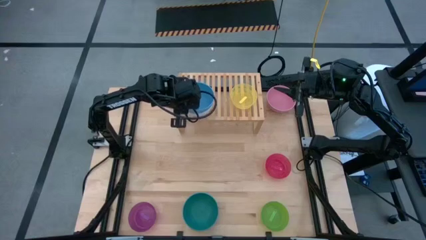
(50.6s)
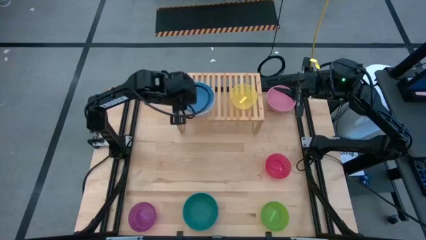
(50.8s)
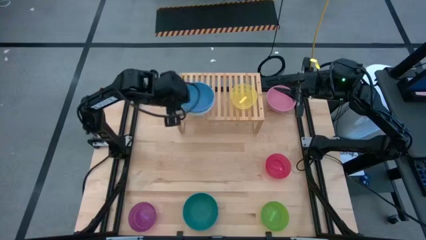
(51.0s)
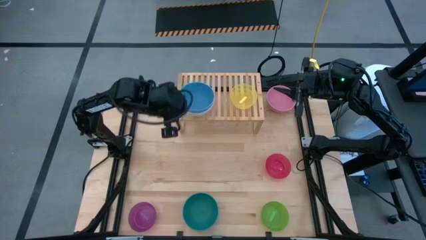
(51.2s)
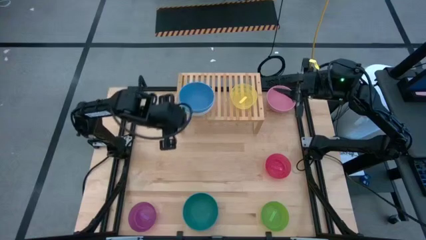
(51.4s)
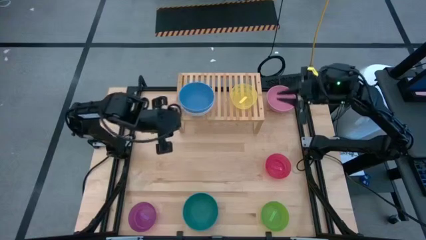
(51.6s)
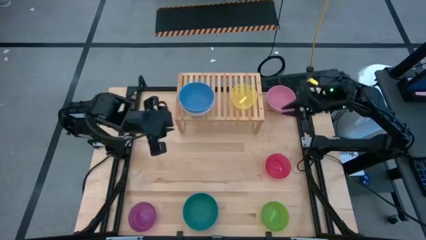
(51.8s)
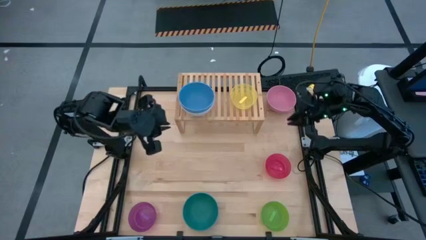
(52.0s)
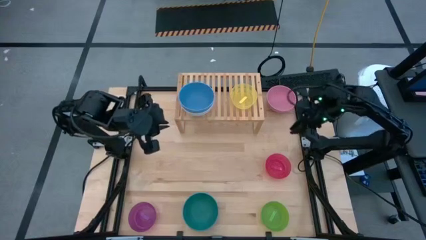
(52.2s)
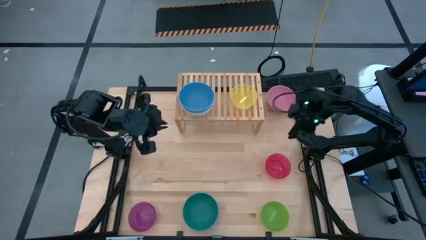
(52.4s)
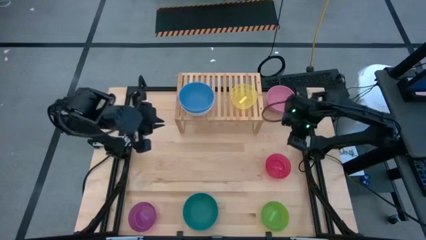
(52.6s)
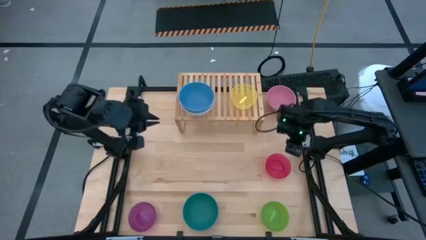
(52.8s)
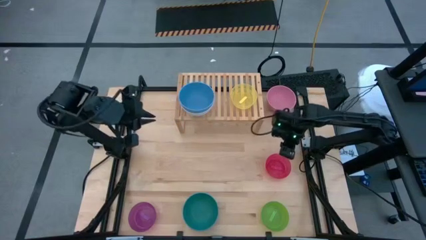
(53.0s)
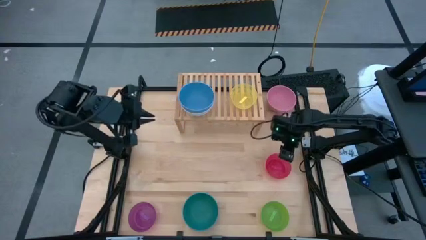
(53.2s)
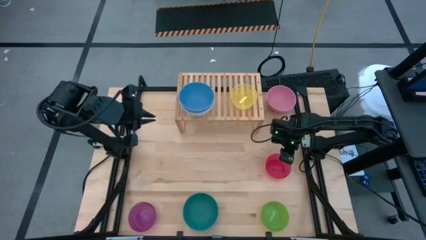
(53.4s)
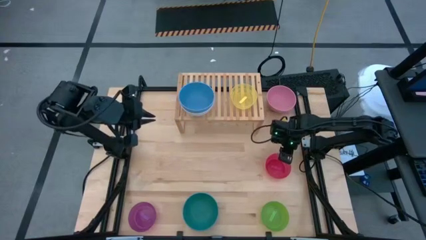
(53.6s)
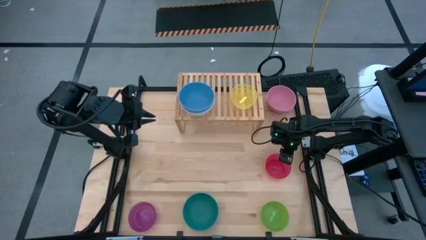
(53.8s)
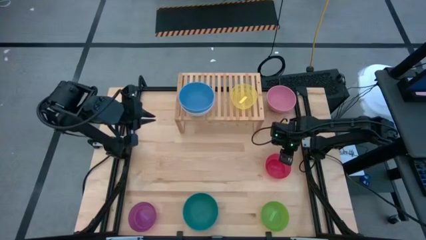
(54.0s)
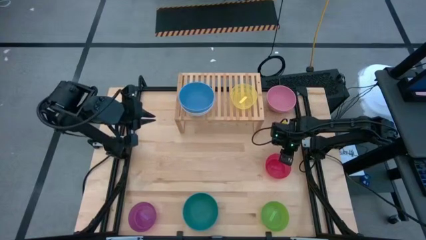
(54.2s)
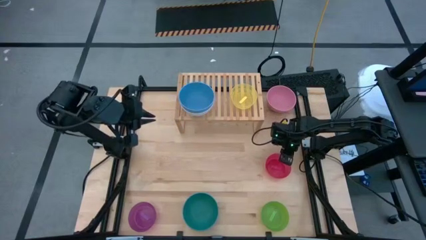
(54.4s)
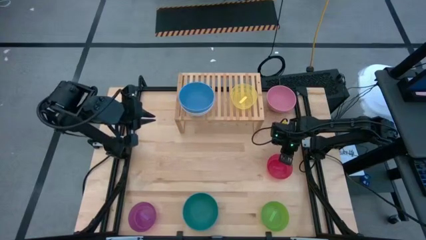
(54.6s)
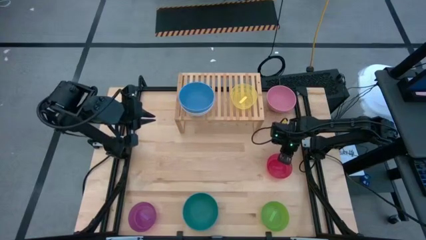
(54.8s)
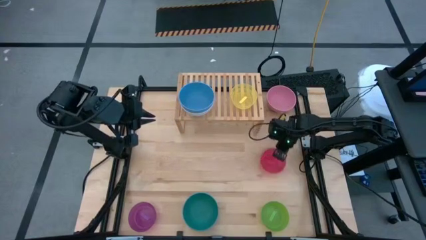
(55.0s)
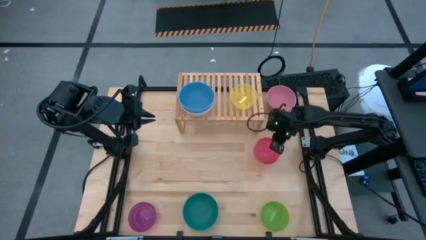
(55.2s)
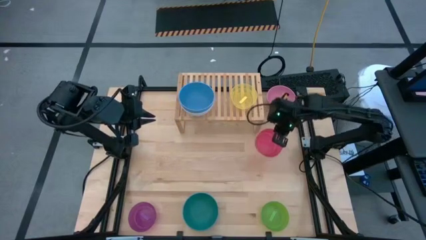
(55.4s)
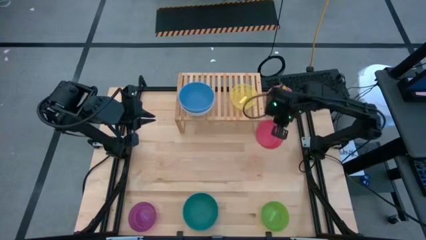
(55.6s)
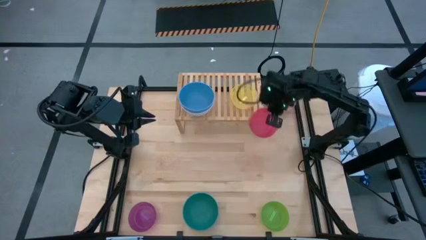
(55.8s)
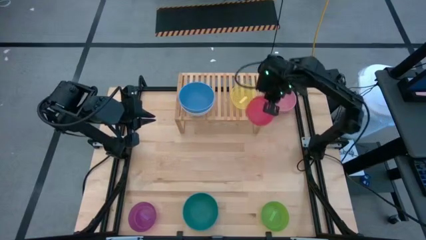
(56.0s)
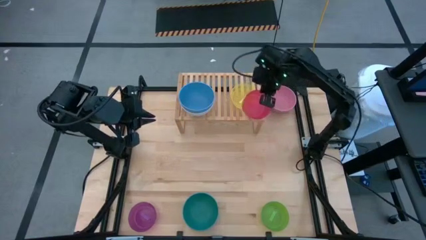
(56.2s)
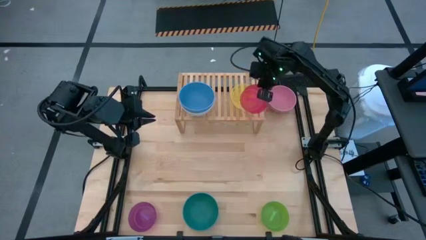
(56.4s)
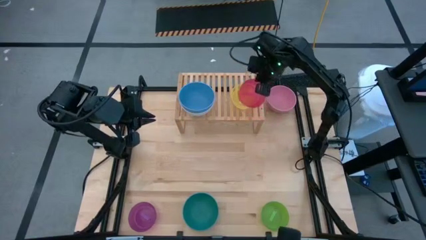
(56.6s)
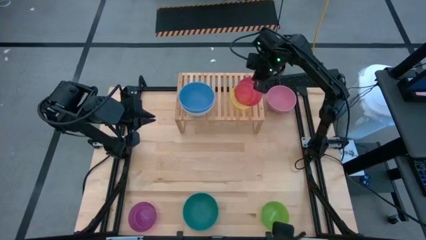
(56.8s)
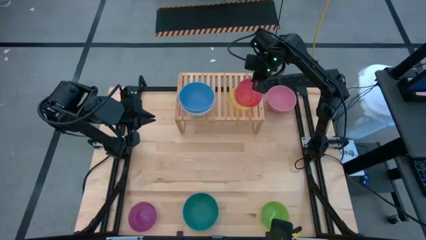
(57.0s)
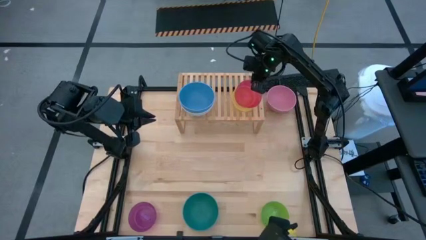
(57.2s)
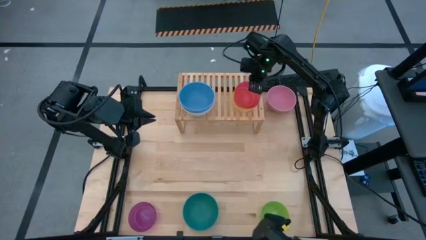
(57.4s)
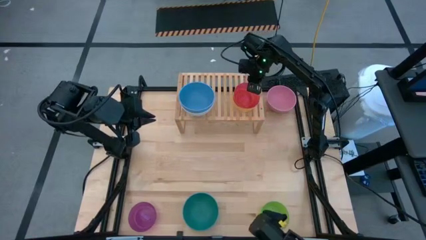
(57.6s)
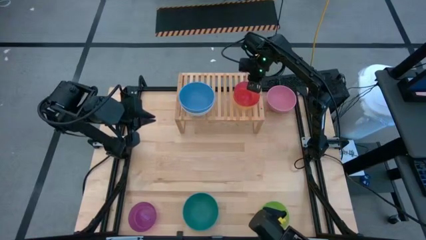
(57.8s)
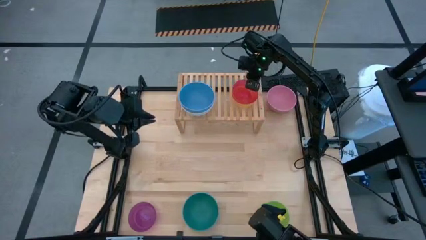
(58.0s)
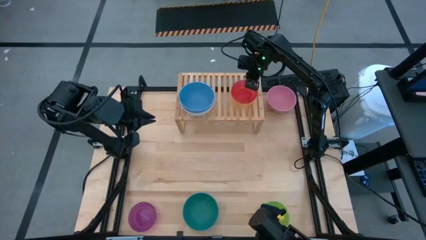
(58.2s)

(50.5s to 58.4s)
Task: Place and stack bowls onto a shelf
Stack the red bowl on top of the yellow bowl on the shelf

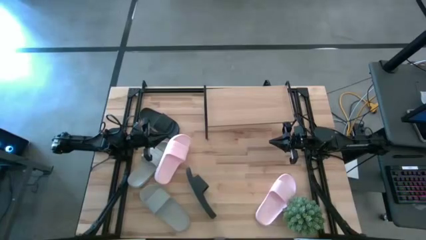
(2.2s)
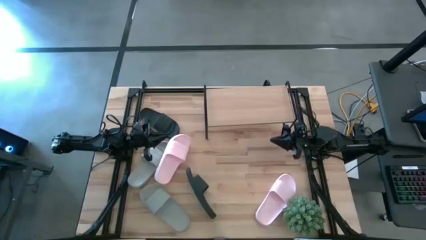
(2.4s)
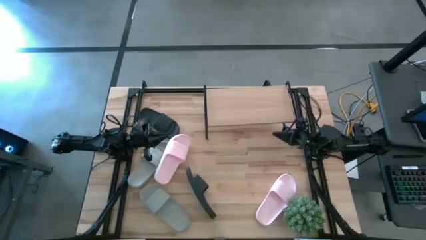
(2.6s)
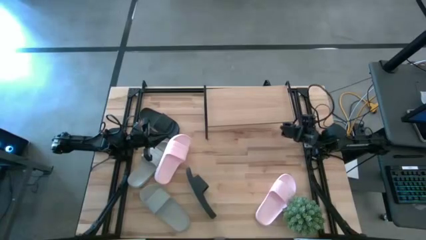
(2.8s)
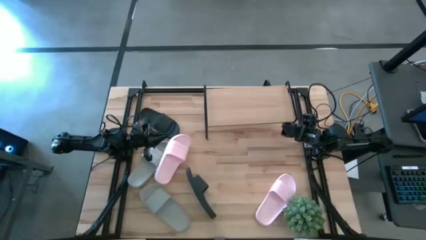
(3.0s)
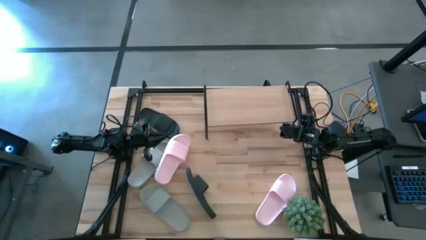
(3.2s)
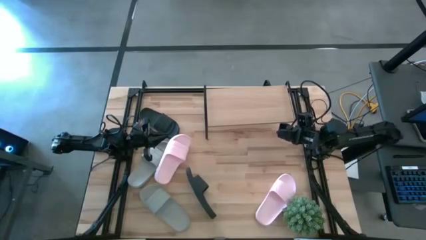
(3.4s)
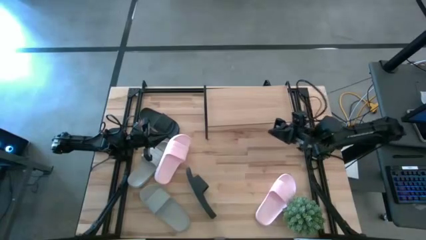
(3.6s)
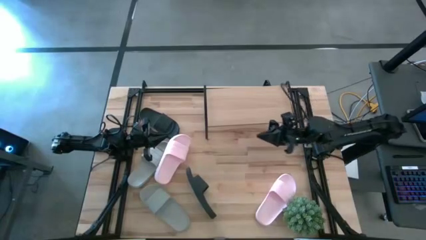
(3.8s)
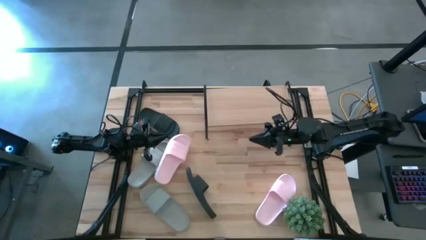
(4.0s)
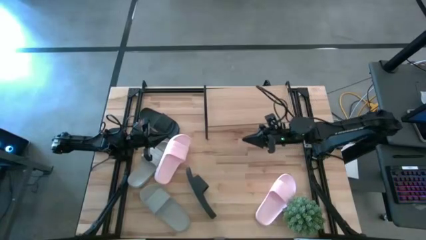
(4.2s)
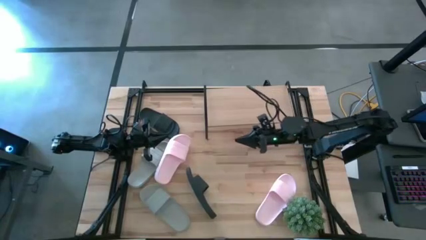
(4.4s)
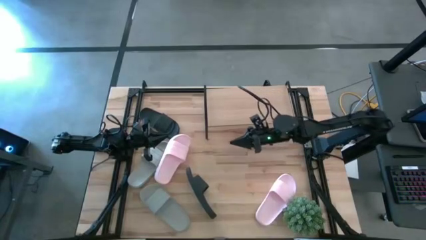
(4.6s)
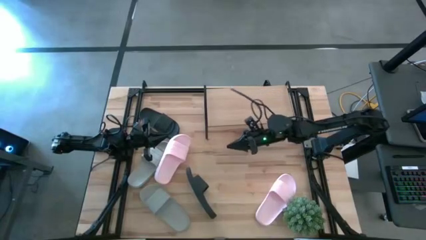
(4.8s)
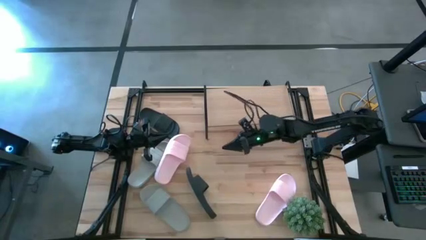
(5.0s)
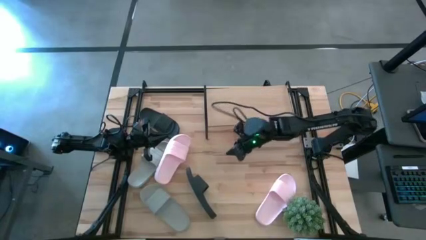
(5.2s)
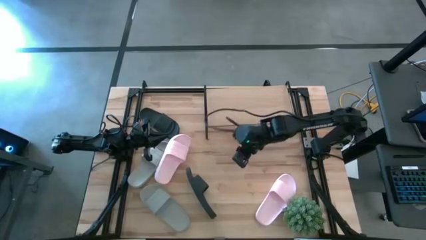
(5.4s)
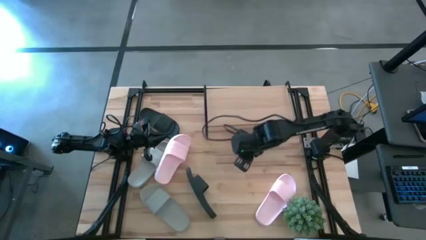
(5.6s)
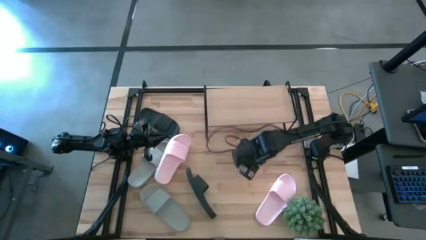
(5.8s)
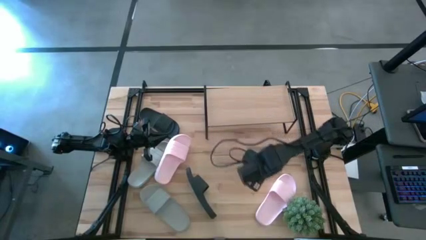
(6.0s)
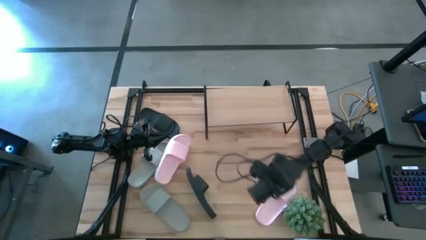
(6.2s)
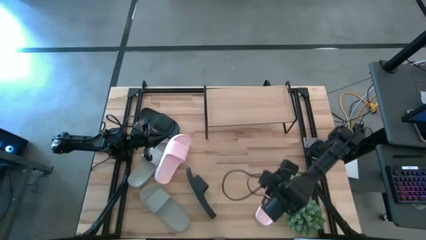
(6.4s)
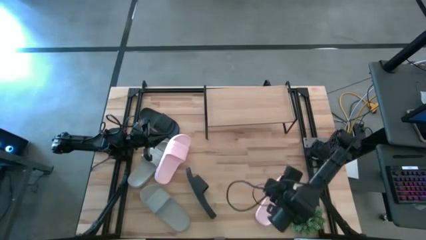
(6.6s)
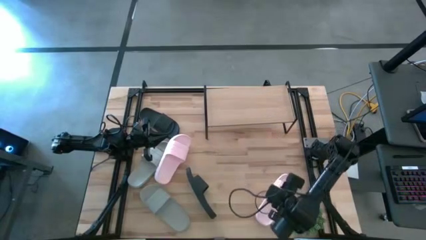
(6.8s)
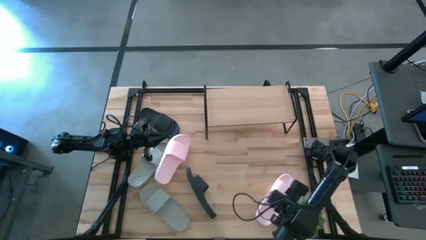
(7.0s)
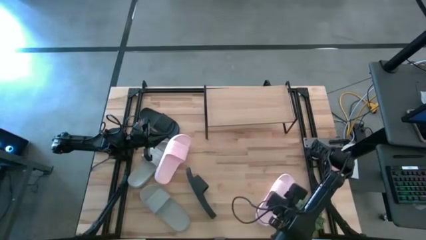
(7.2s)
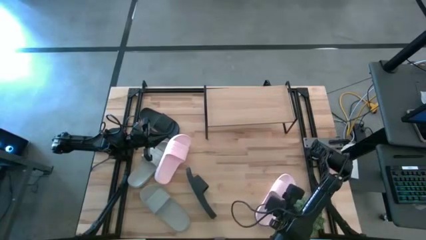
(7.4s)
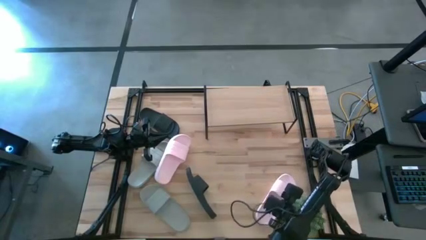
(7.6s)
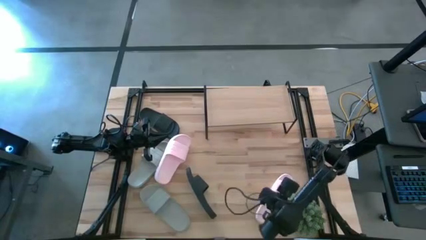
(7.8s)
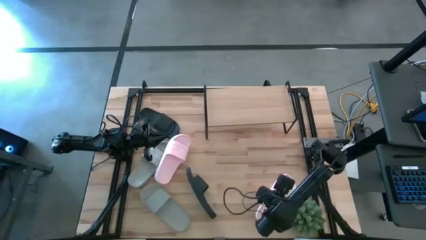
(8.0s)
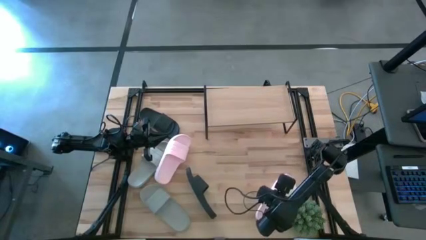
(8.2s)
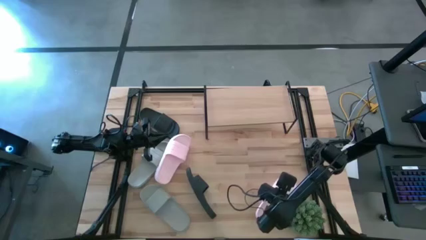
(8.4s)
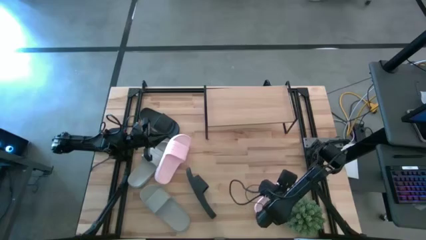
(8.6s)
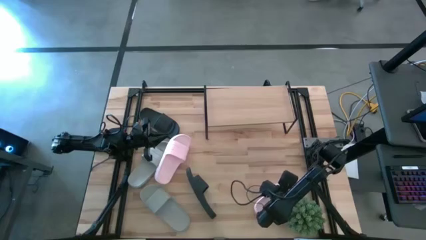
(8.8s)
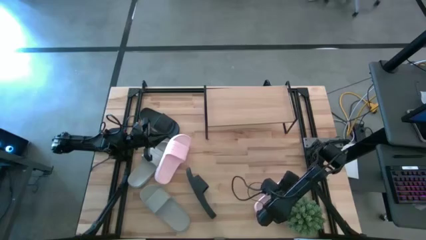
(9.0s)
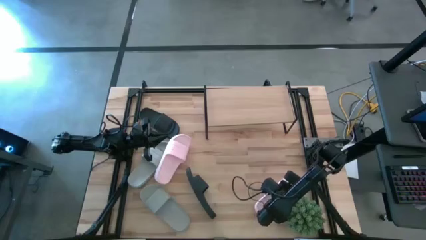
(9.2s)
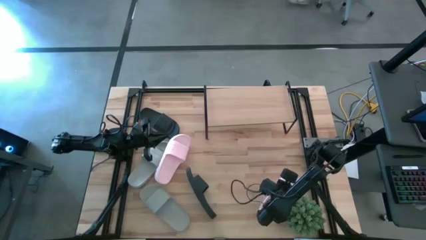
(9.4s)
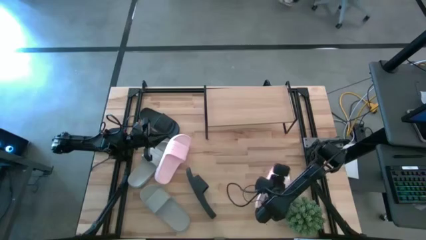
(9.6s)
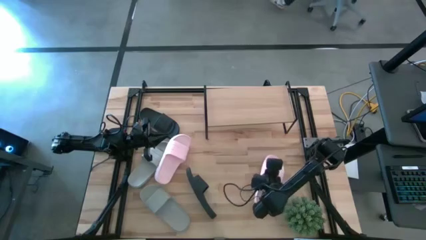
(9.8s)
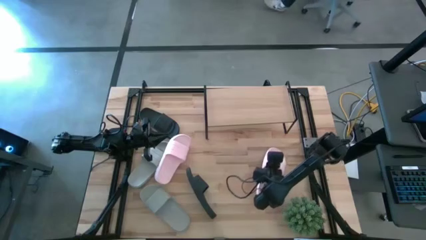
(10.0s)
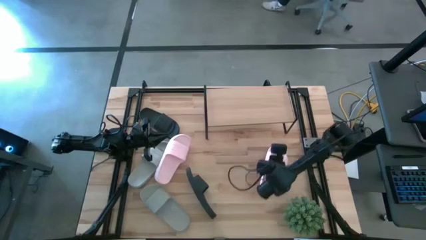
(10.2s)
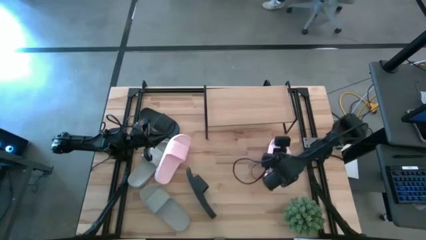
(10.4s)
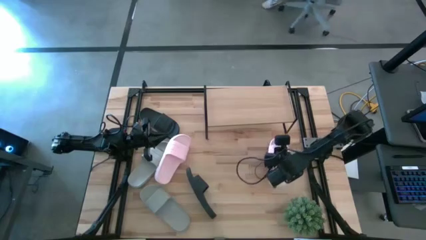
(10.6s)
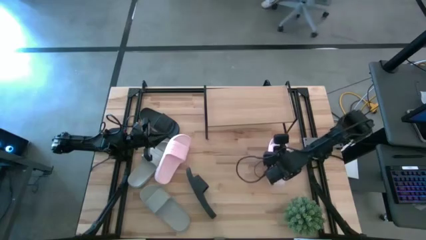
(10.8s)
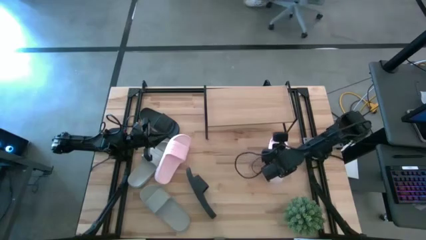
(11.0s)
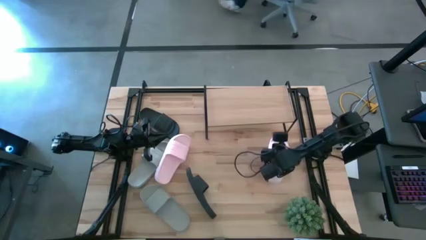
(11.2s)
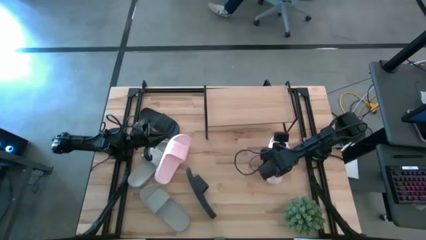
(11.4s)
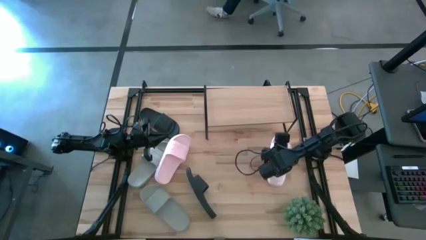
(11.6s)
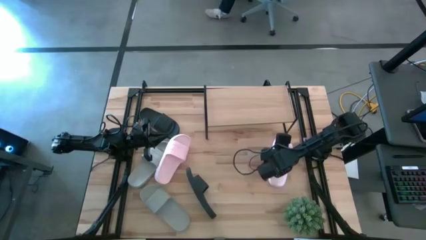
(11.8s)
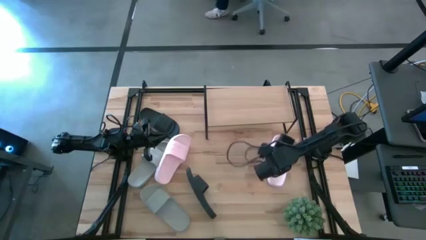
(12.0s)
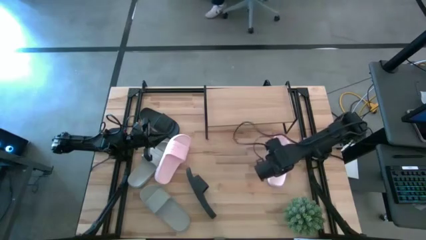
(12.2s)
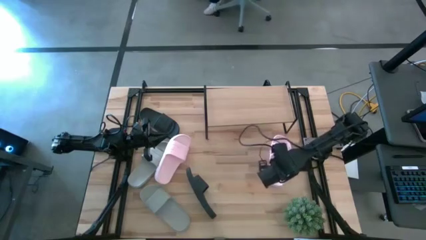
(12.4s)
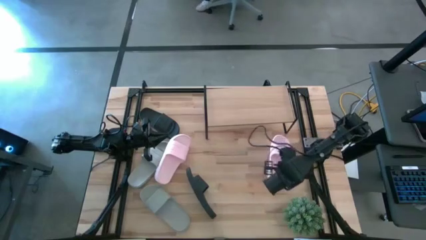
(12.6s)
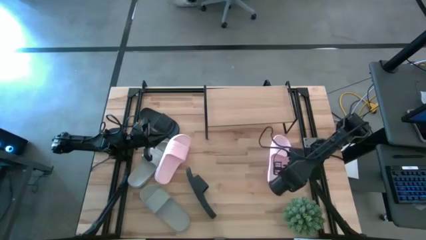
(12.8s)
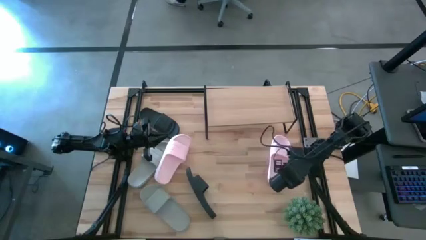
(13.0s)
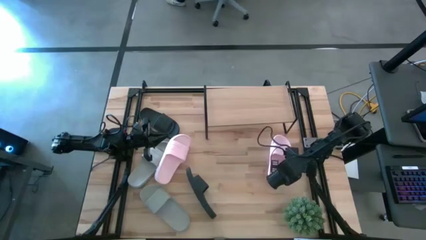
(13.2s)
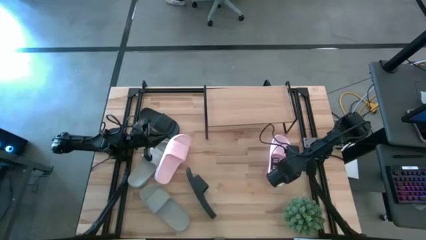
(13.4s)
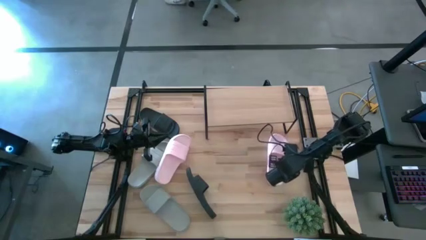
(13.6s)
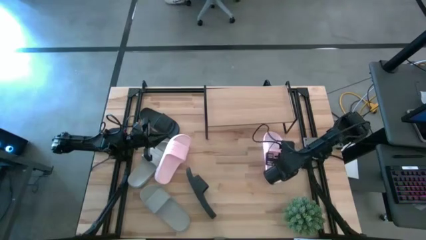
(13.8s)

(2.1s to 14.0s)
Task: Pick and place slides into the shelf
Move the bottom pink slide to the middle right of the table
